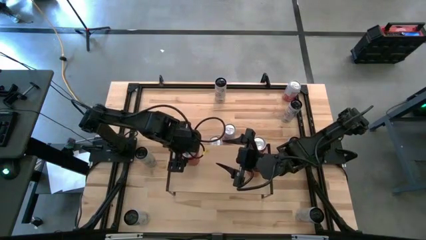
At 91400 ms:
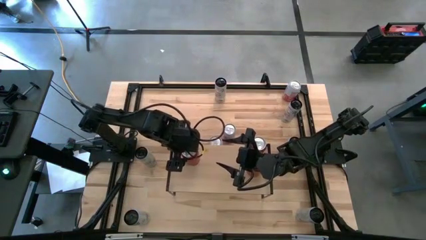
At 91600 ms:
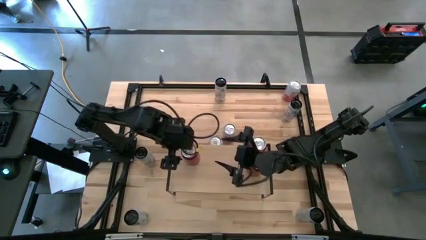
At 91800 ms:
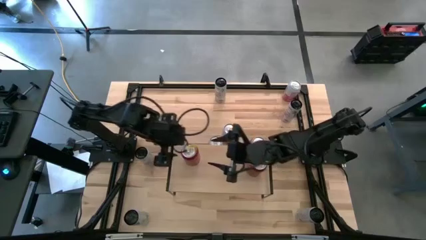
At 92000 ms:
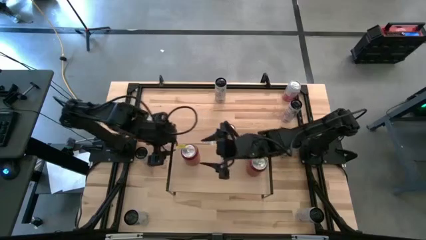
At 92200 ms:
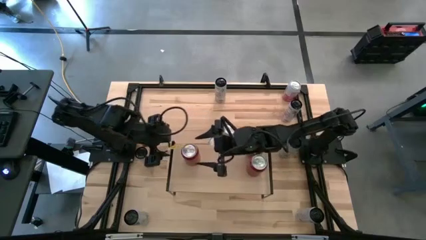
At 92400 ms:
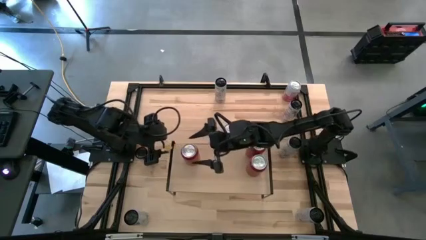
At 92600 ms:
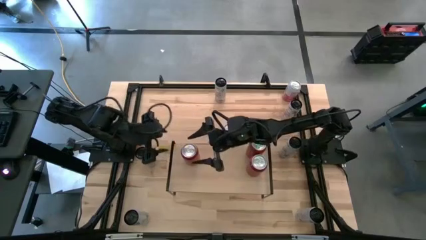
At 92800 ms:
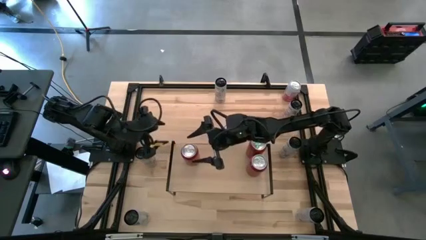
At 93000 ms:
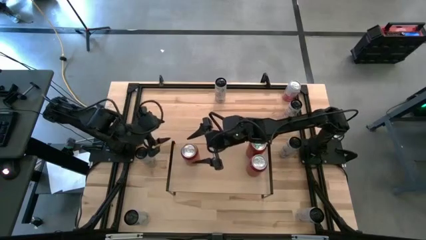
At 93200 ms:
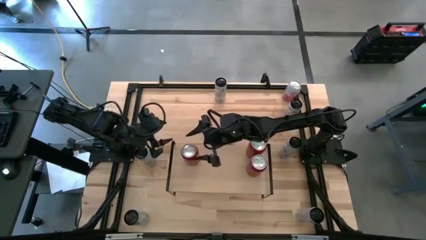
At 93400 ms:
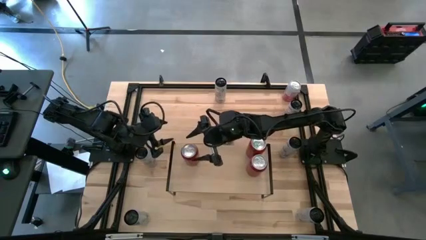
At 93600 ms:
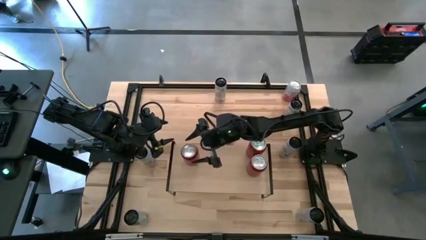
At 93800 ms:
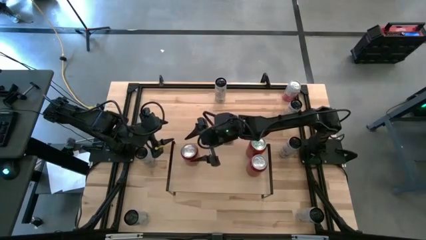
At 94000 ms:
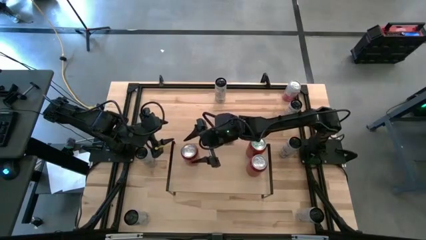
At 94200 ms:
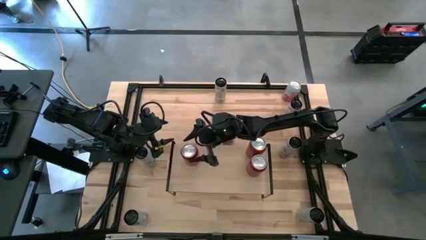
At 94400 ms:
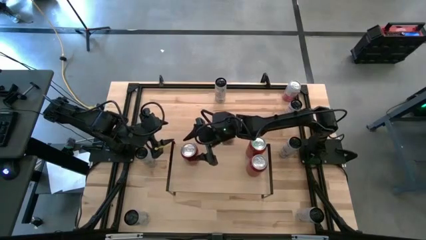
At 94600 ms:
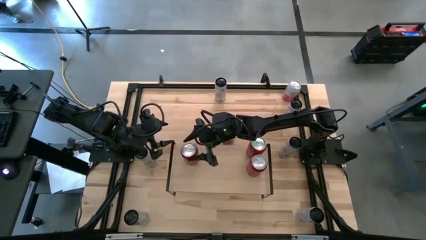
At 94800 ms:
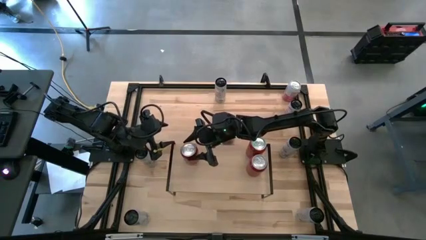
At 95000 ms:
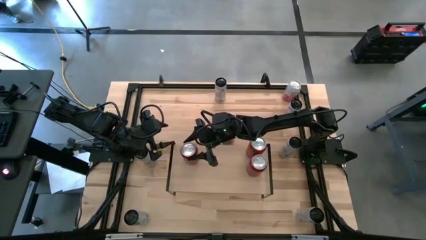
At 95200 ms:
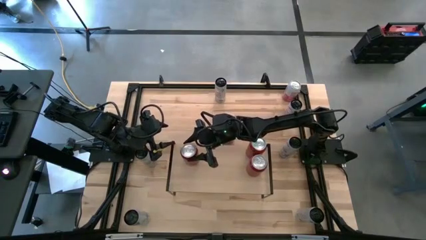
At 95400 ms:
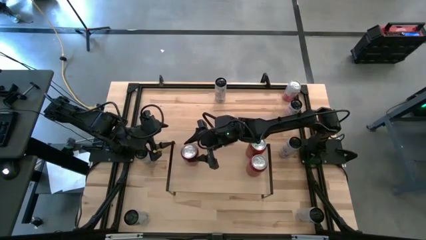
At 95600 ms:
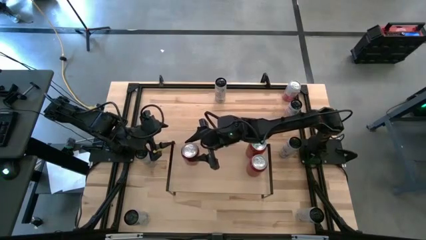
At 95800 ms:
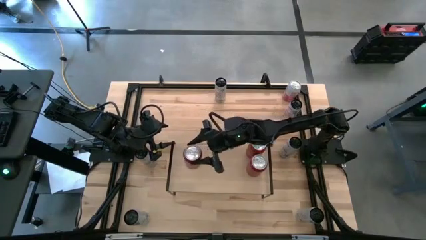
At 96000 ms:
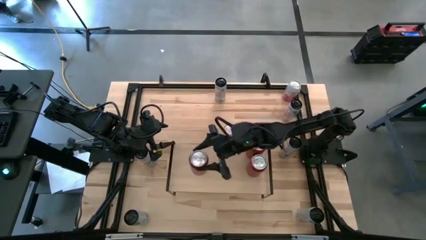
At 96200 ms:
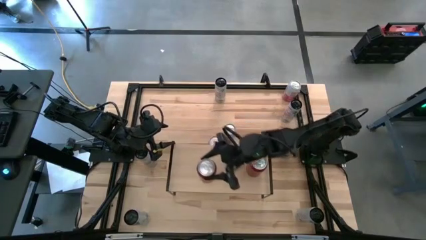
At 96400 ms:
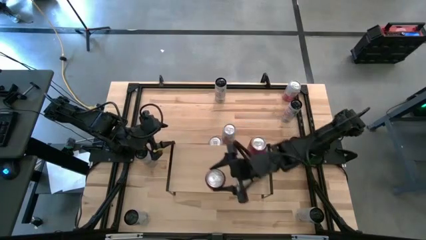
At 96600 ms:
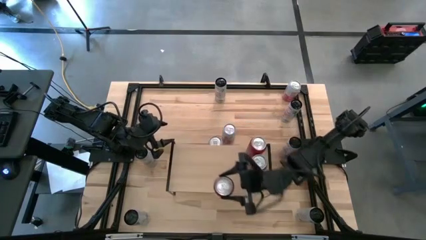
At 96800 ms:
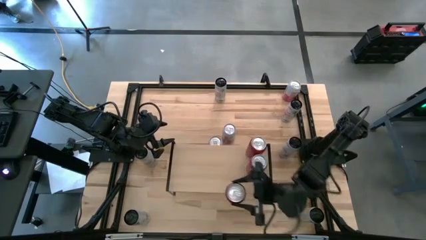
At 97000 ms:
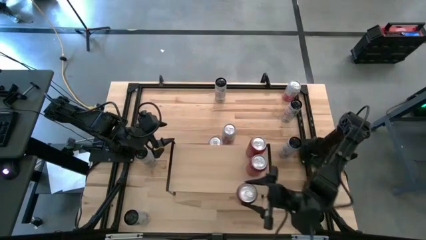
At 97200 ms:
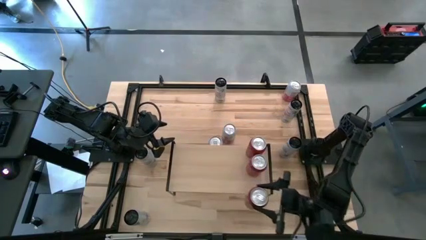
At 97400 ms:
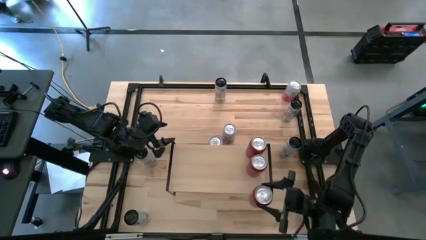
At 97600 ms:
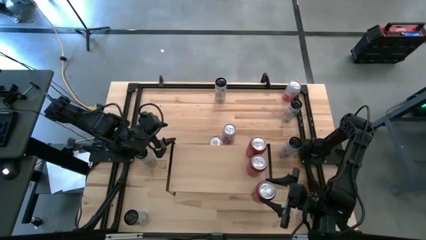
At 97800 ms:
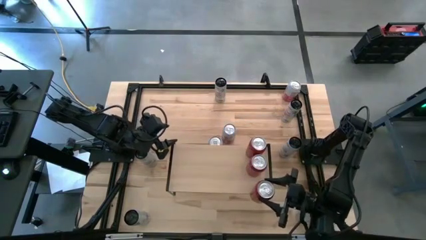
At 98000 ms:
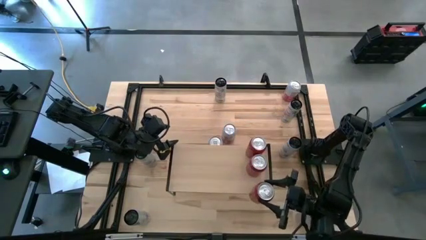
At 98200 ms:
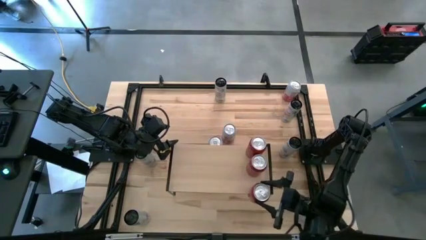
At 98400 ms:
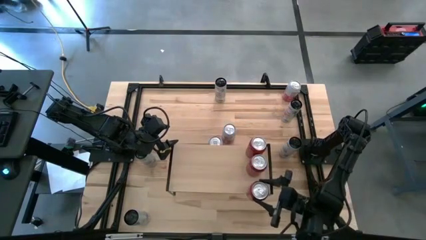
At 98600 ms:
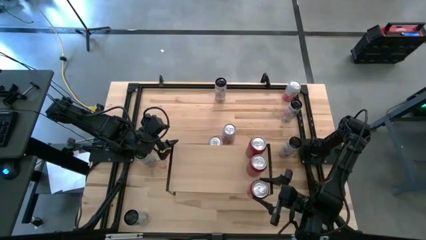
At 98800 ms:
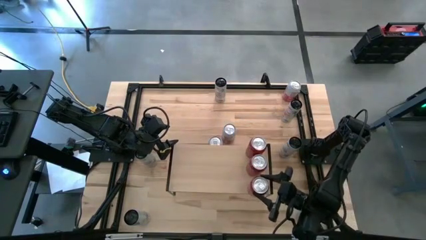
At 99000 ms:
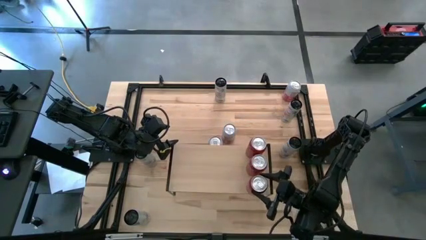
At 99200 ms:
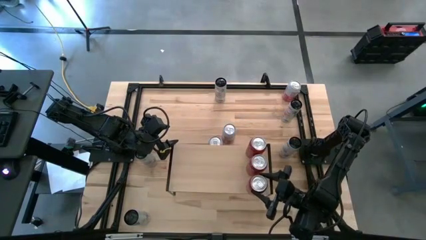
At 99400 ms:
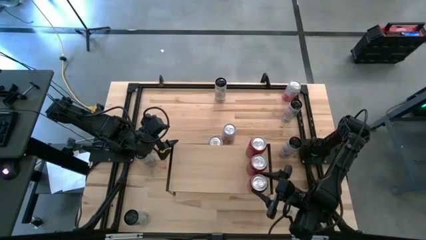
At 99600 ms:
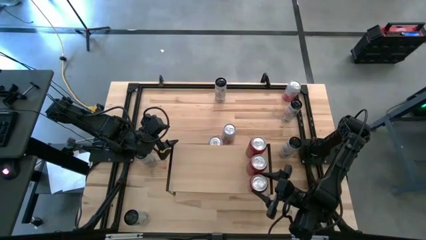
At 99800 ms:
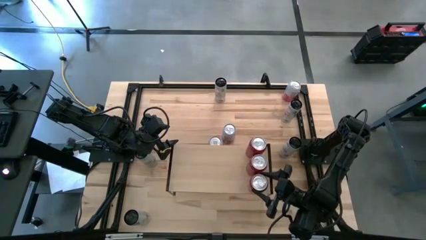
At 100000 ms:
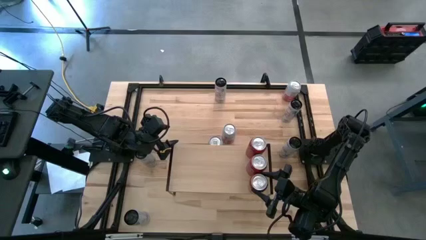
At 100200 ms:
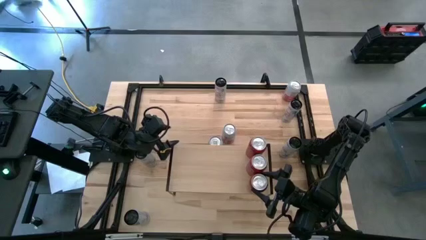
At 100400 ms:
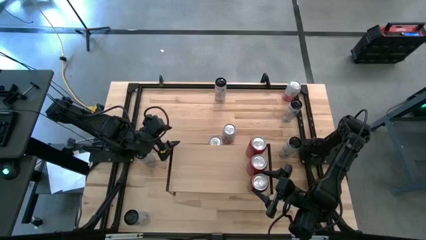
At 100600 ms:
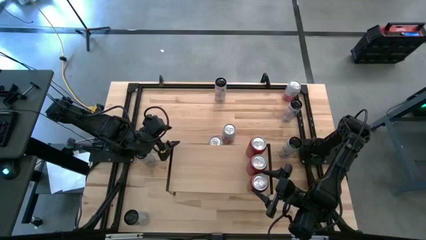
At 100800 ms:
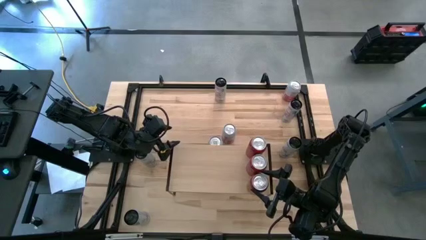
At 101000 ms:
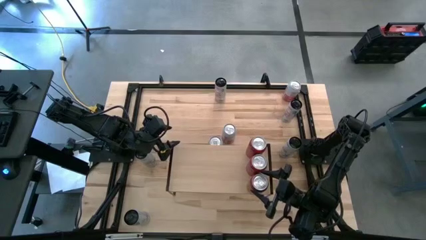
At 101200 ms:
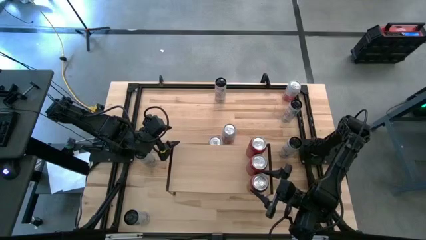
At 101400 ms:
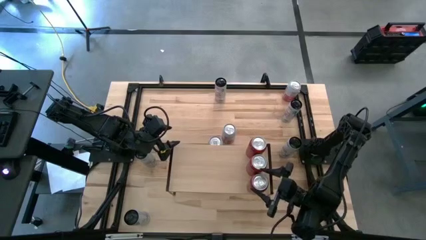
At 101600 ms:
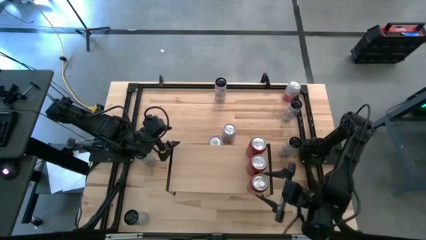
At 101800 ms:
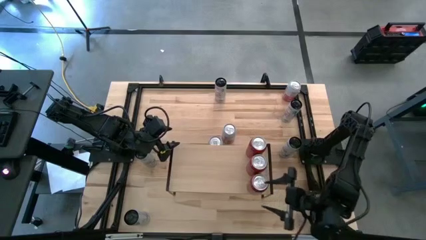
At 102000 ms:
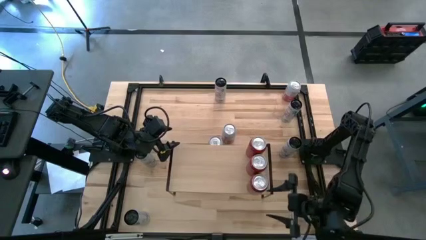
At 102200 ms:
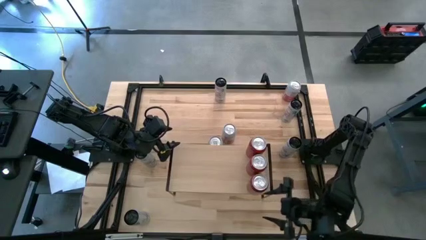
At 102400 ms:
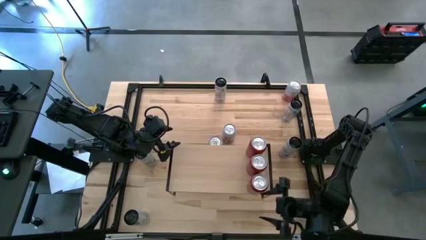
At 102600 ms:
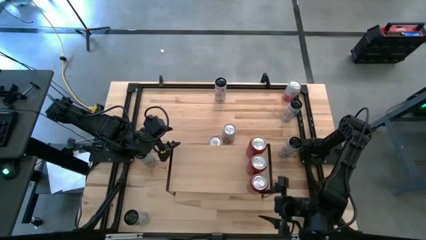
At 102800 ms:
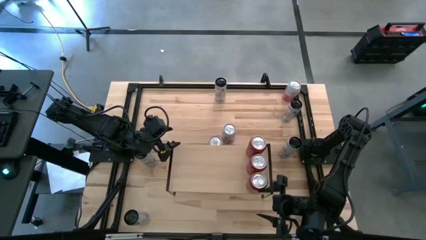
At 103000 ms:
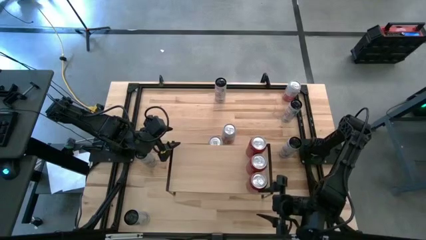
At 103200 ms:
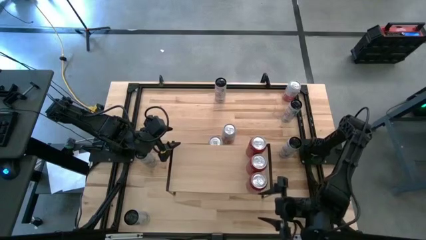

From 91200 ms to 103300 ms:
Task: Place canned beverage on shelf
Put the red-black soda can on the shelf aligned with the other red-black soda cans
